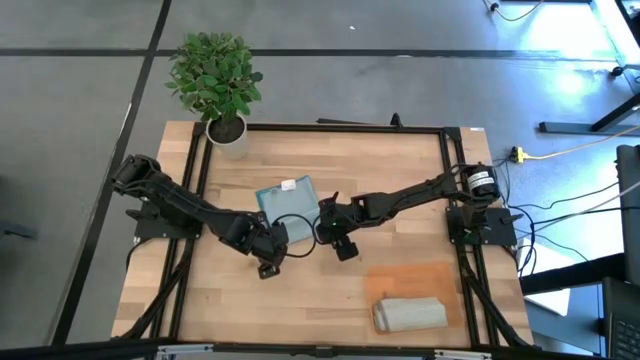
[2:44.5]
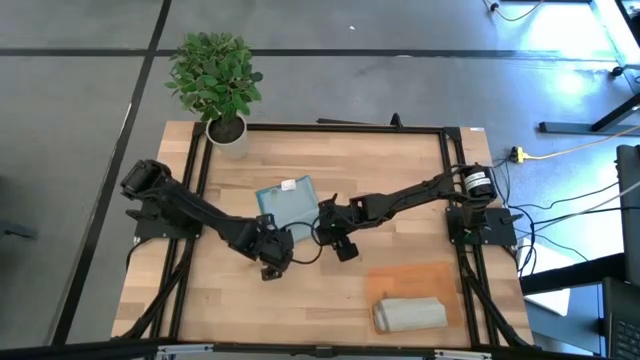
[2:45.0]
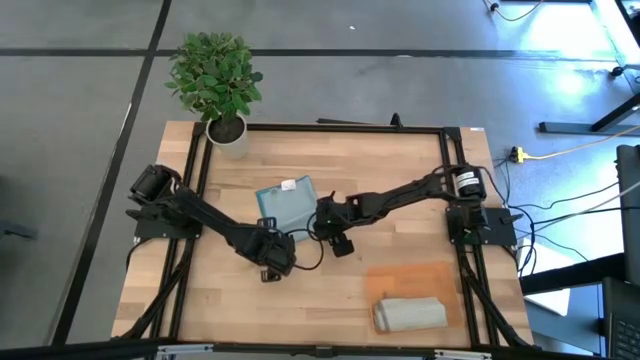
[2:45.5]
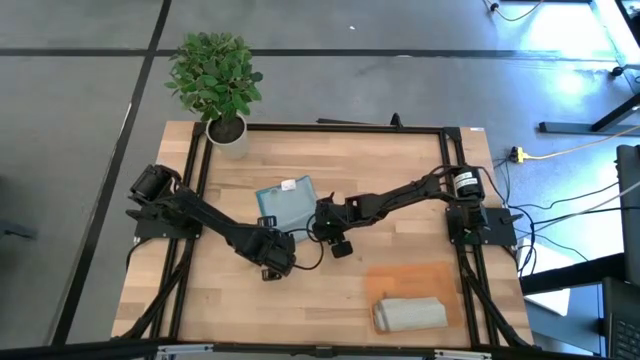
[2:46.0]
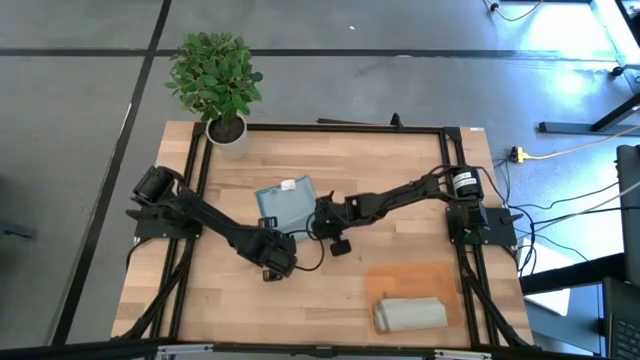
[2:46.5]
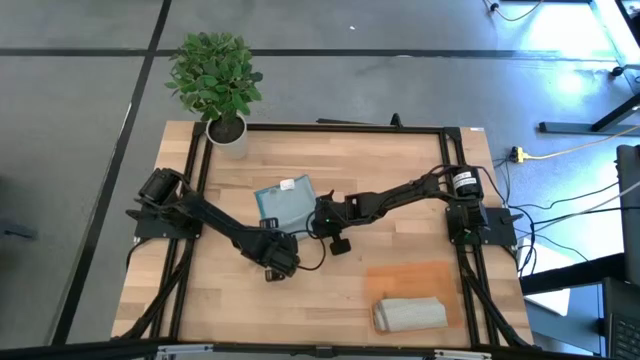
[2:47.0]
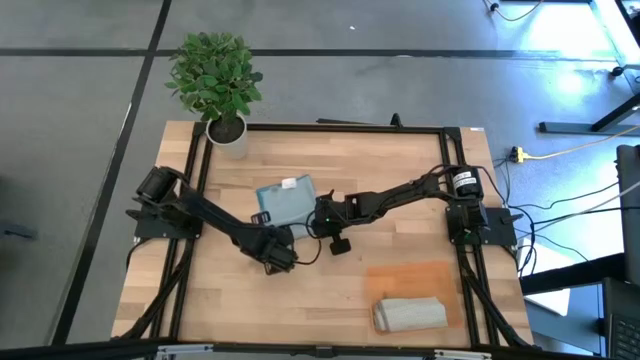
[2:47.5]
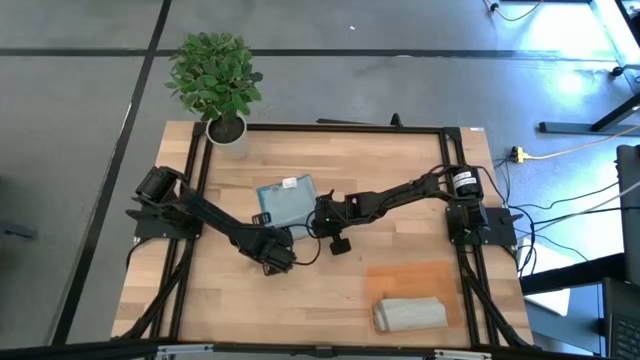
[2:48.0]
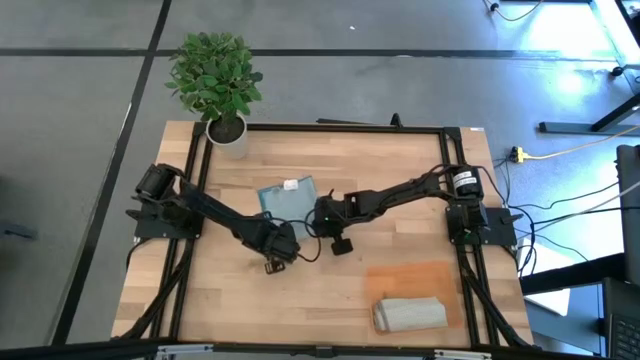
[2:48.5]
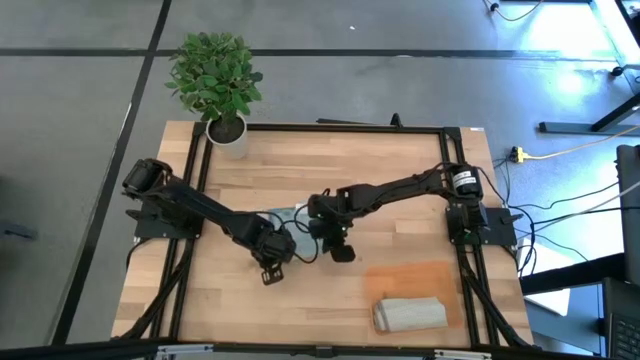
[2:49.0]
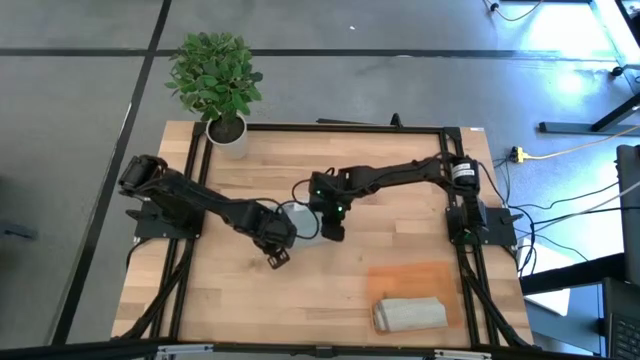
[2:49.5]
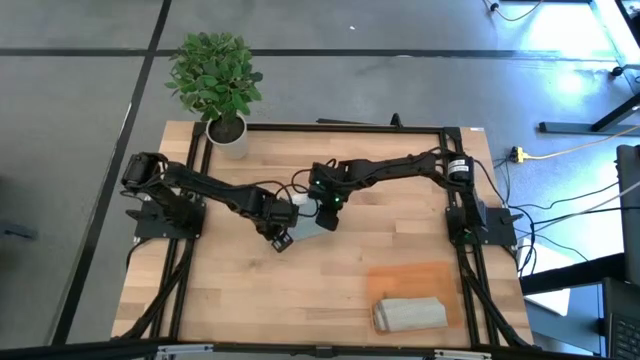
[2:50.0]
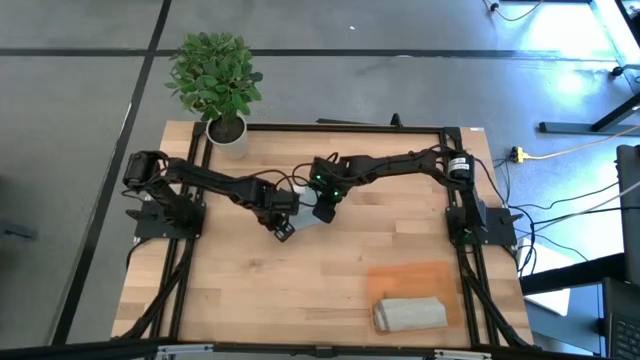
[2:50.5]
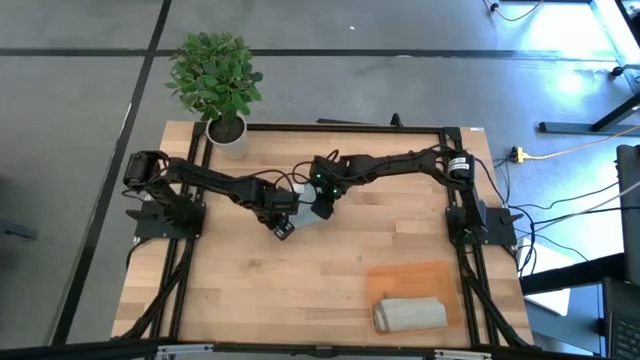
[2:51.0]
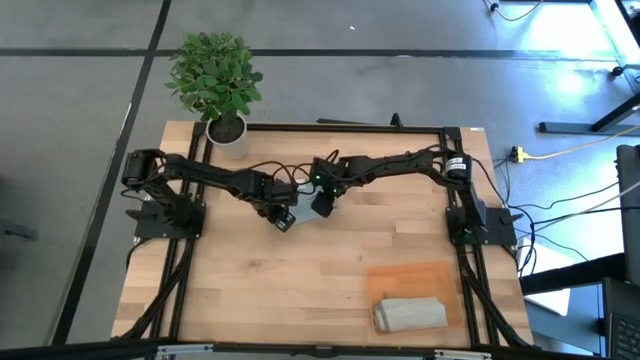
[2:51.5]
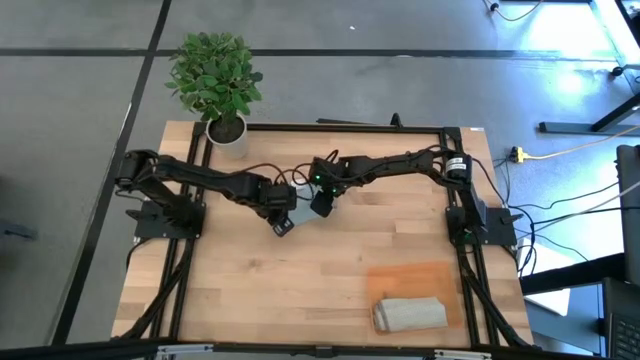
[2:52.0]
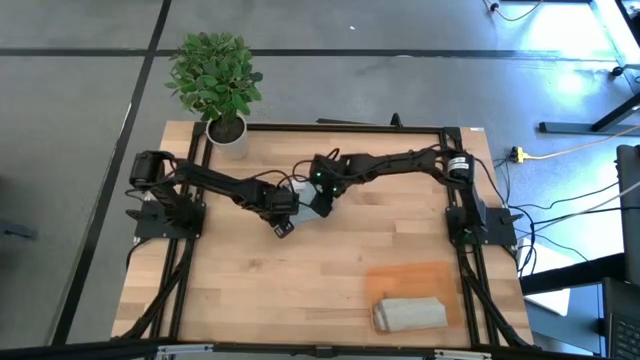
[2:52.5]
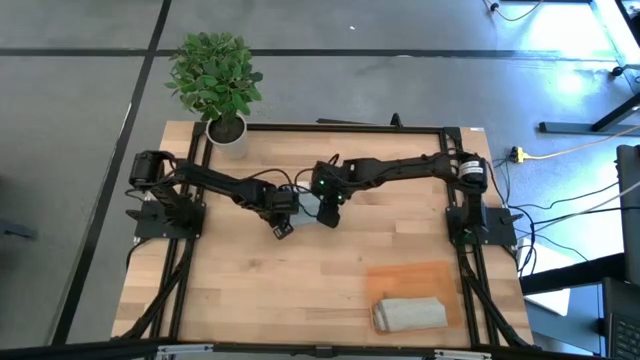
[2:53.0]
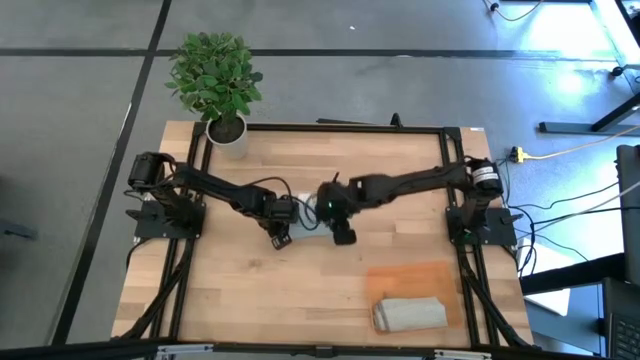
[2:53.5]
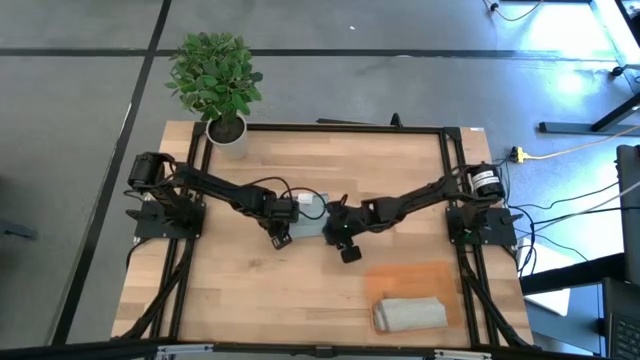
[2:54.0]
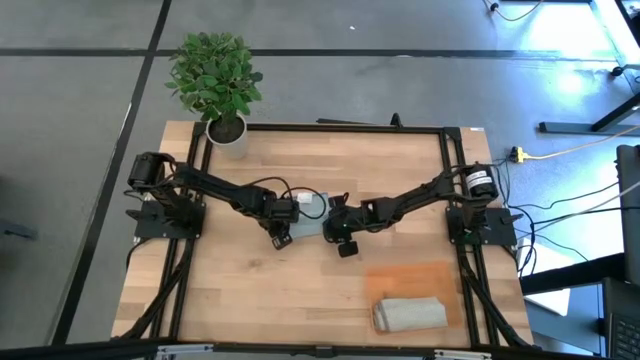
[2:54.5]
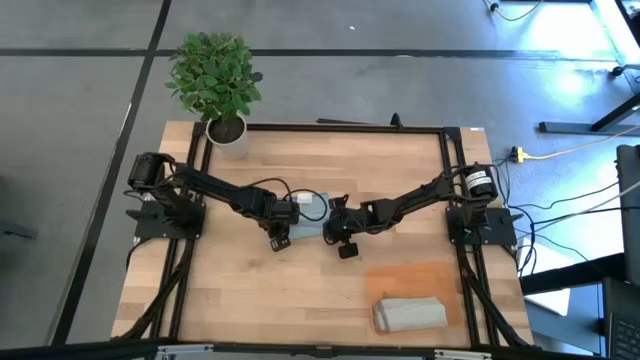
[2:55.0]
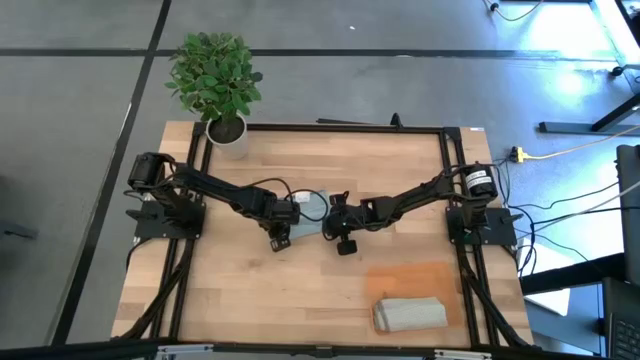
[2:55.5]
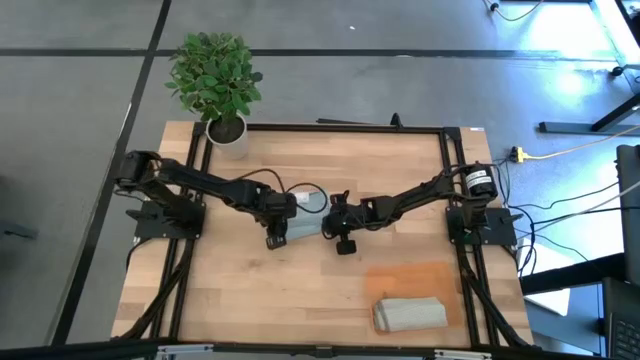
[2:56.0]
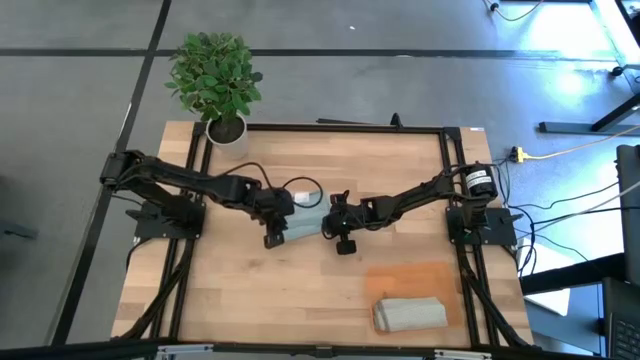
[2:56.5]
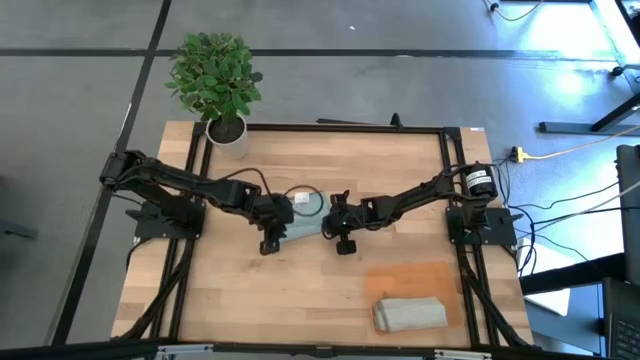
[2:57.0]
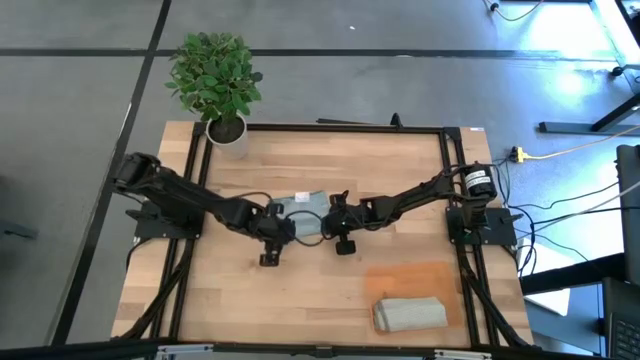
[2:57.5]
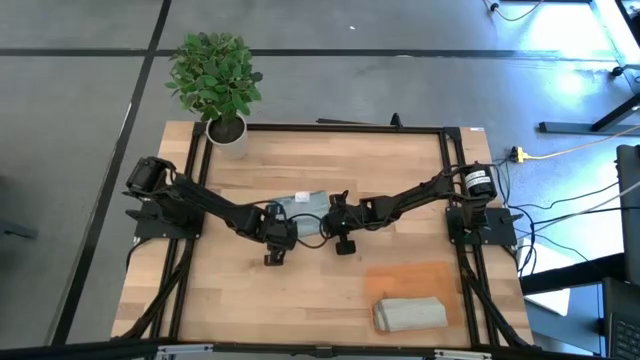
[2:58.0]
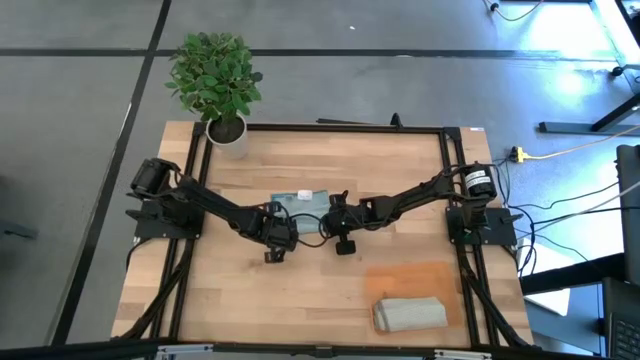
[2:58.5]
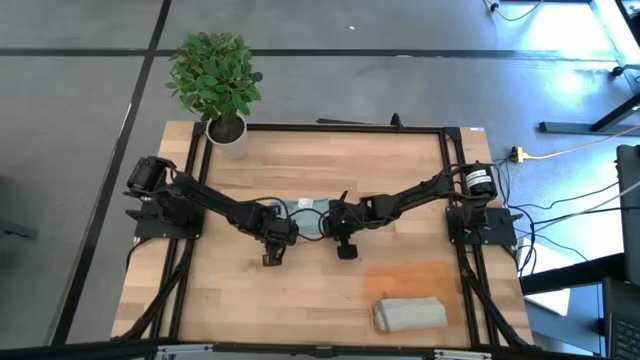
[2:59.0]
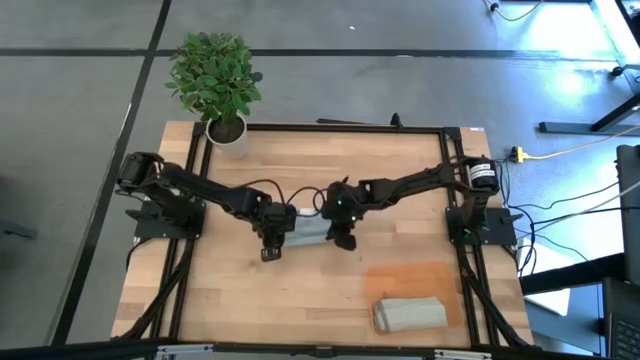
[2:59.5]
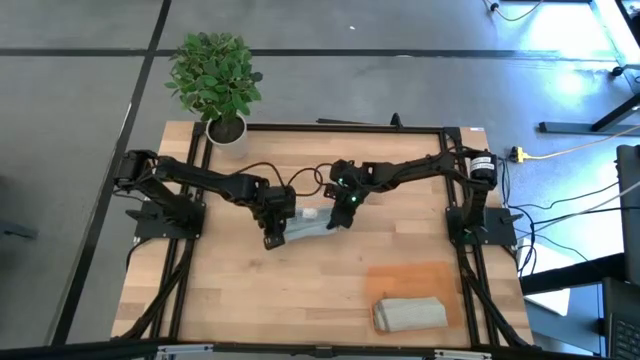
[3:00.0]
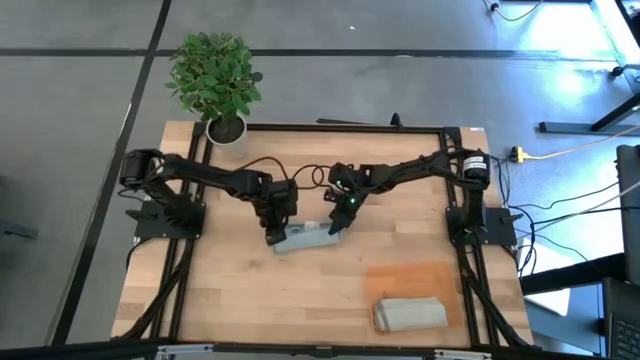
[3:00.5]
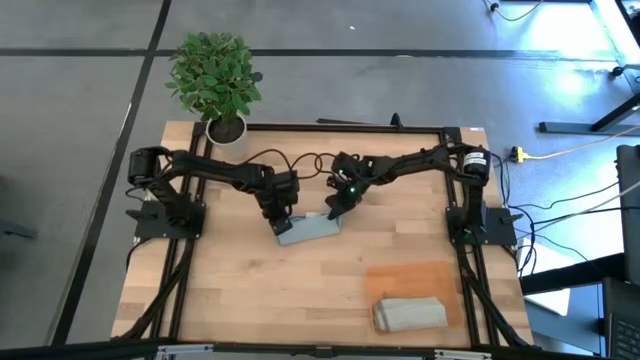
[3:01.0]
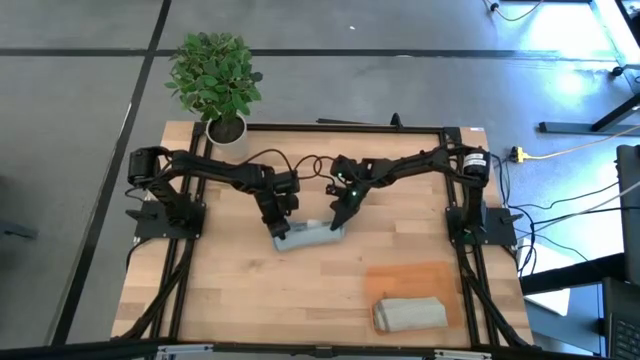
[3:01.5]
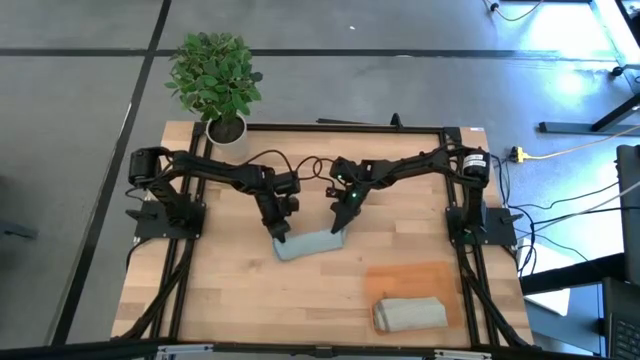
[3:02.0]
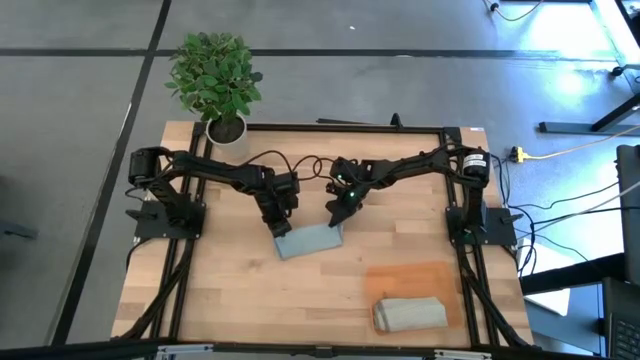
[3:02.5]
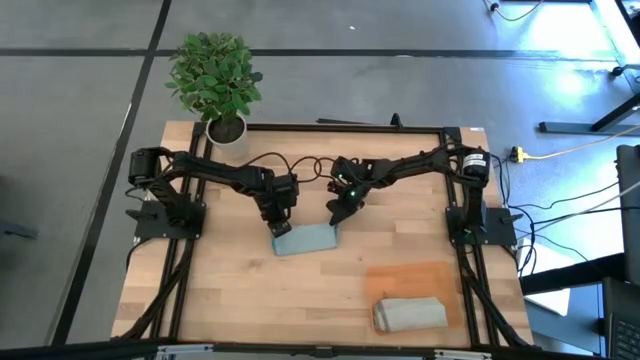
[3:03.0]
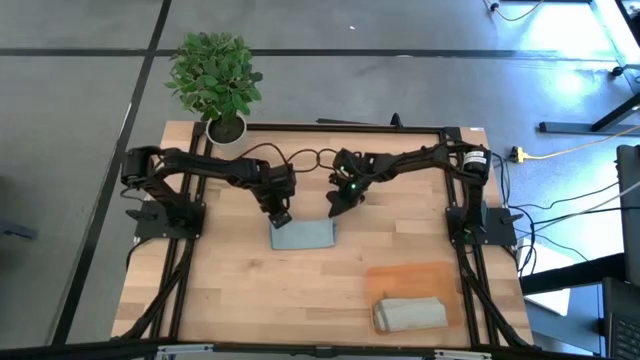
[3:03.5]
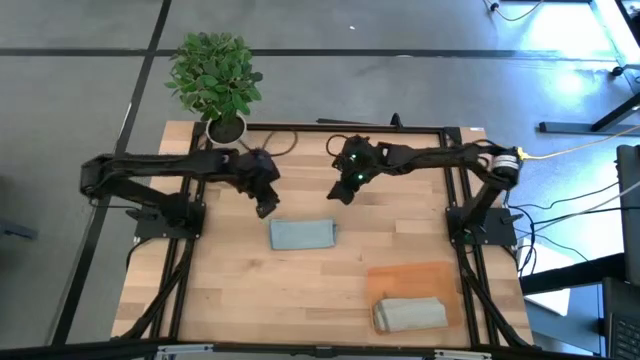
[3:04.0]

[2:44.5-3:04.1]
Task: Roll microfiber towels into tight, uniform cylinder then place into a basket
Roll the light blue microfiber towel

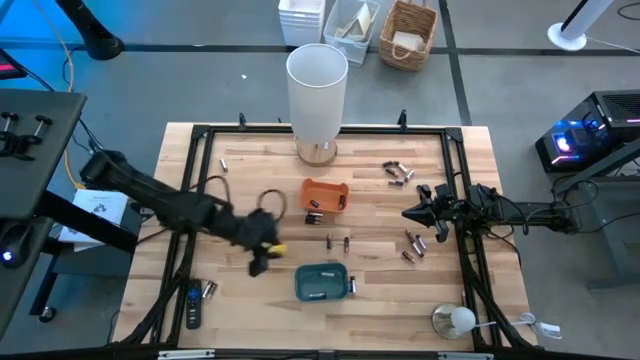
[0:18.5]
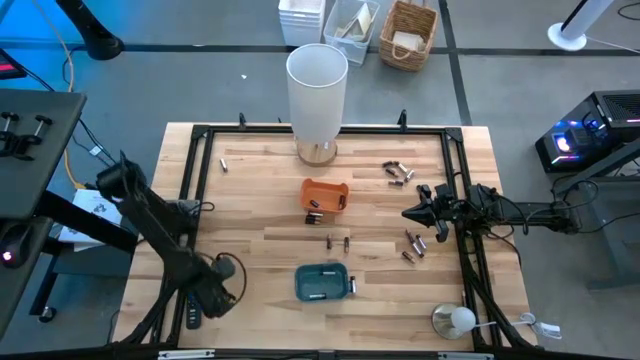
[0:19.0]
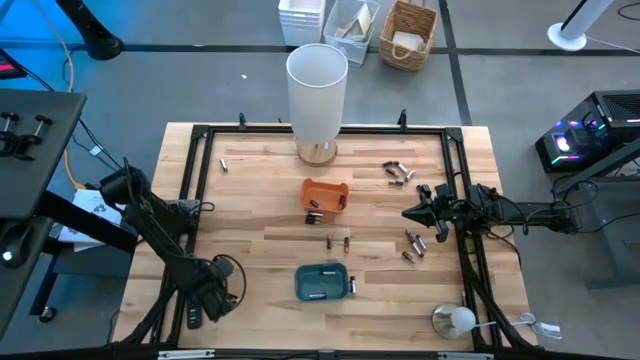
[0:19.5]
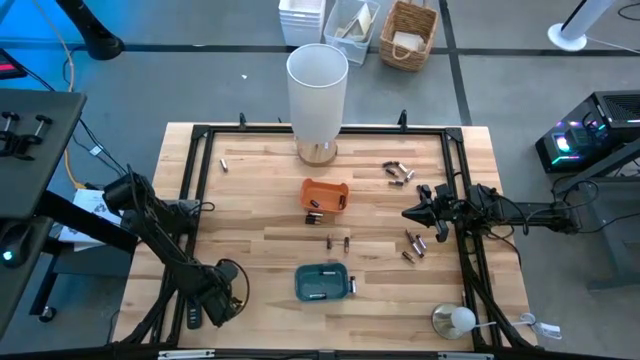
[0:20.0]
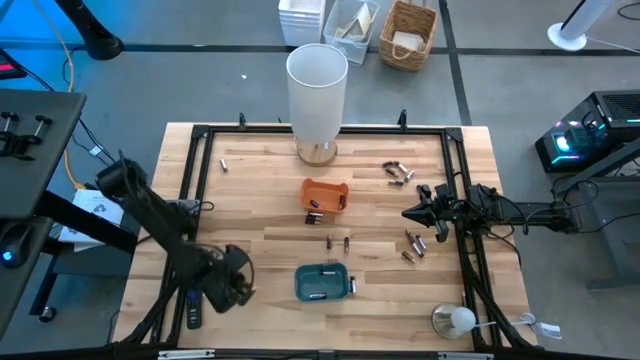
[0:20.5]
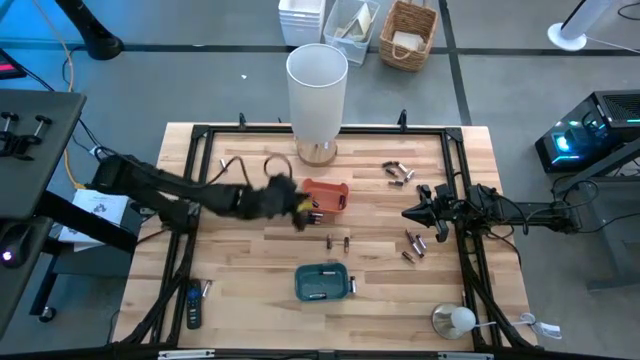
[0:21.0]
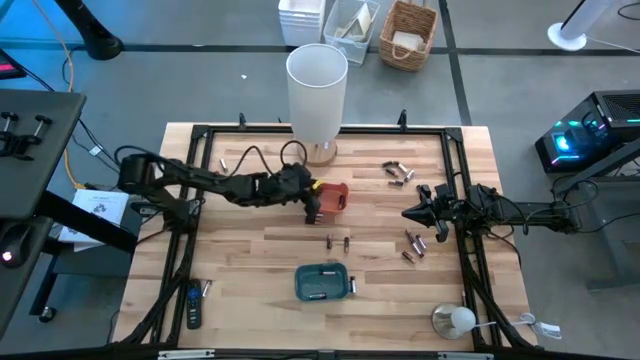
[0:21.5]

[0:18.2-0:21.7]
Task: Sort batteries
Put the black battery into the orange bin
